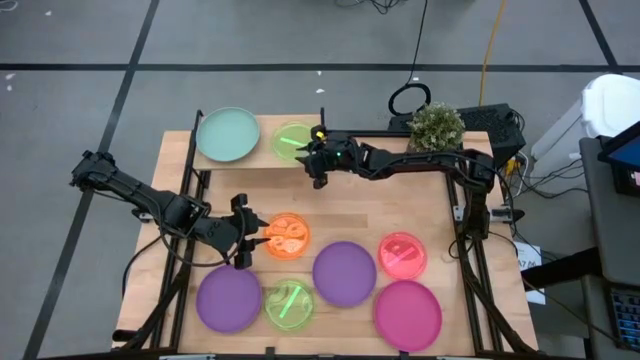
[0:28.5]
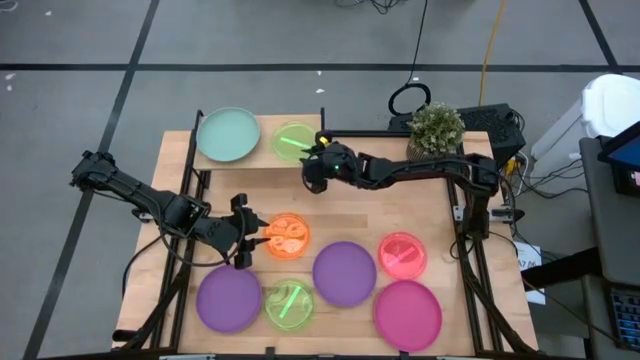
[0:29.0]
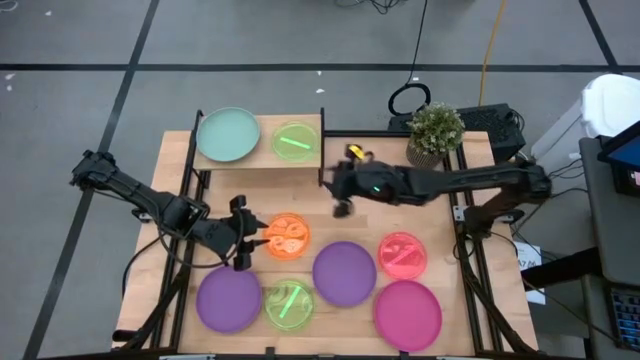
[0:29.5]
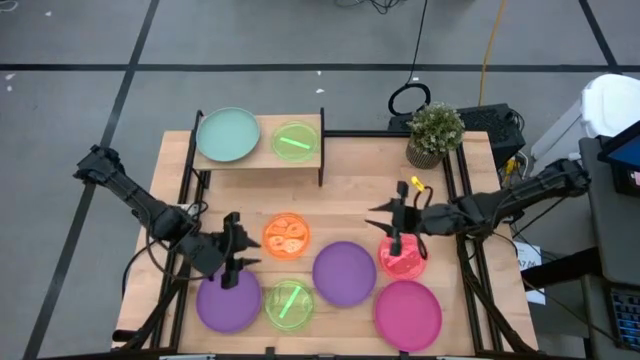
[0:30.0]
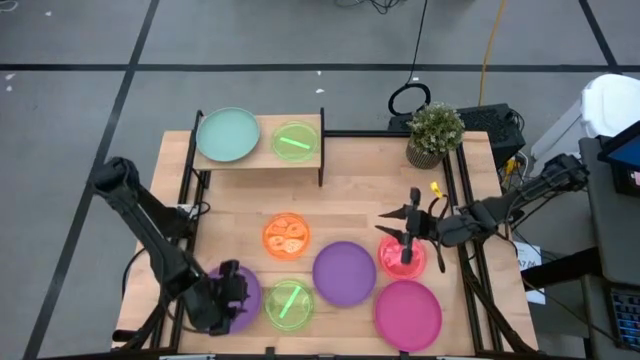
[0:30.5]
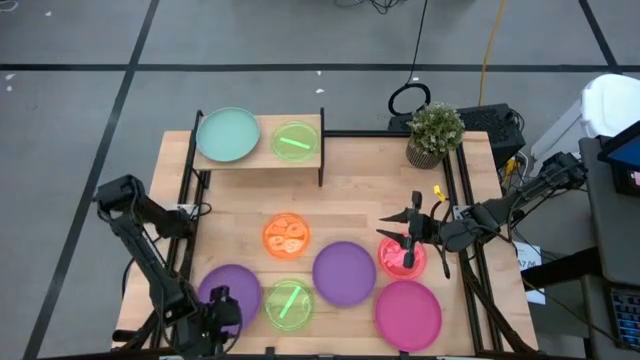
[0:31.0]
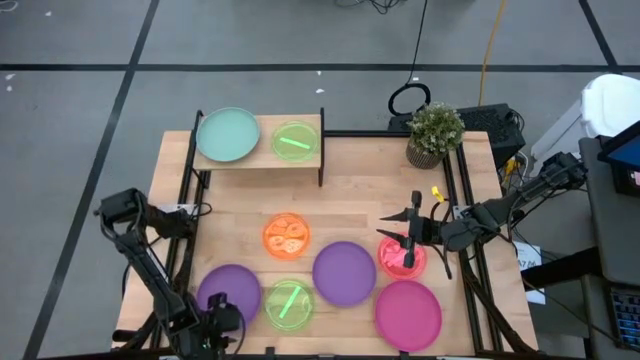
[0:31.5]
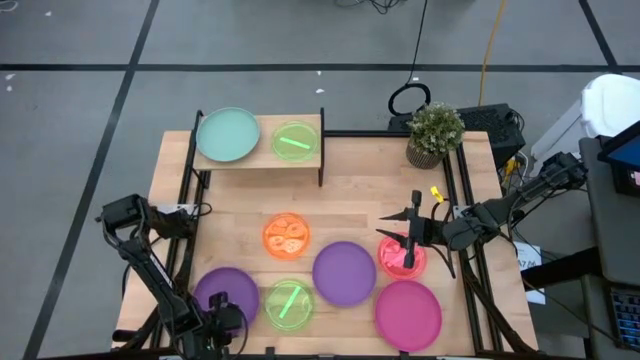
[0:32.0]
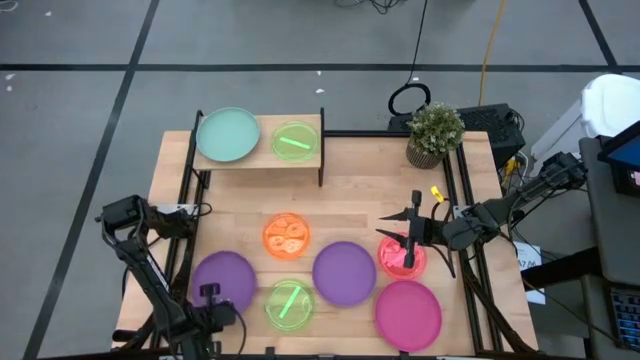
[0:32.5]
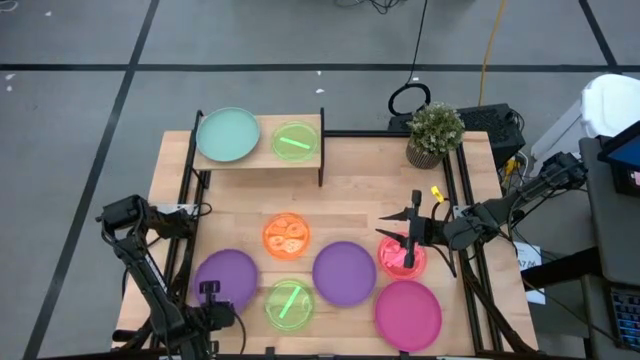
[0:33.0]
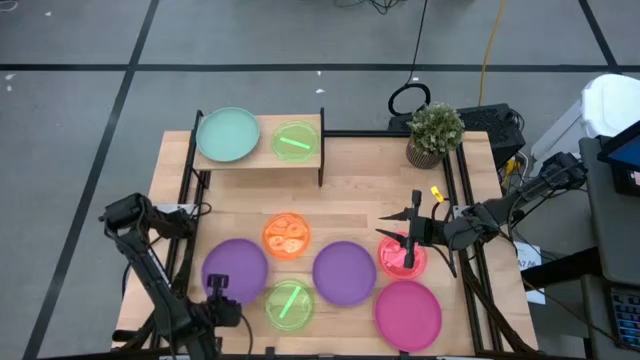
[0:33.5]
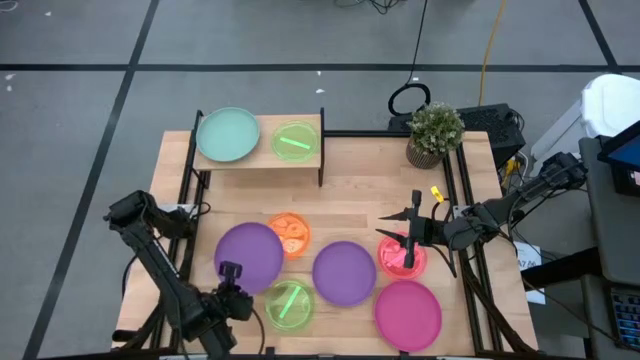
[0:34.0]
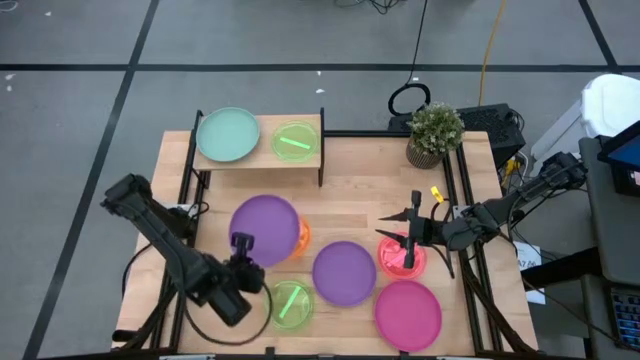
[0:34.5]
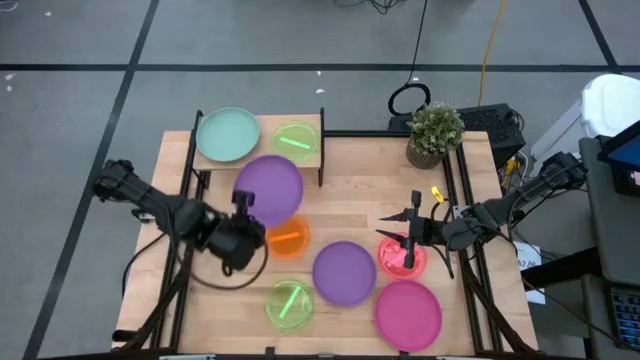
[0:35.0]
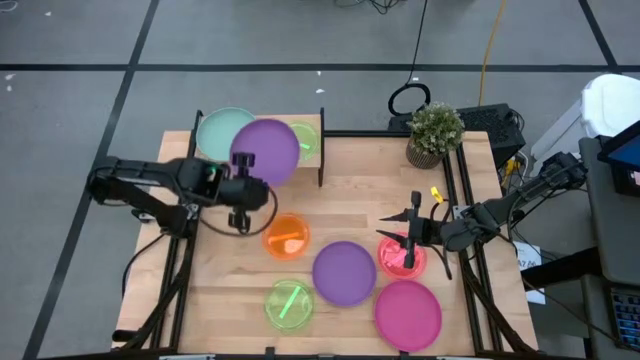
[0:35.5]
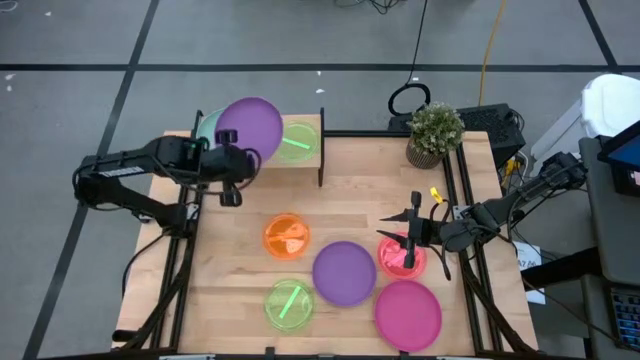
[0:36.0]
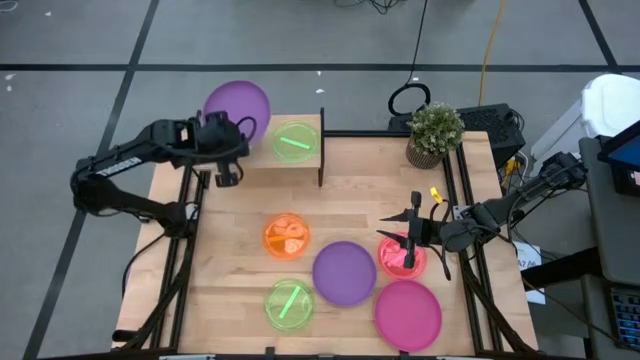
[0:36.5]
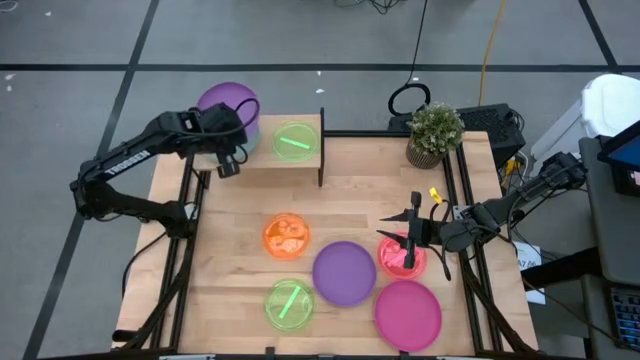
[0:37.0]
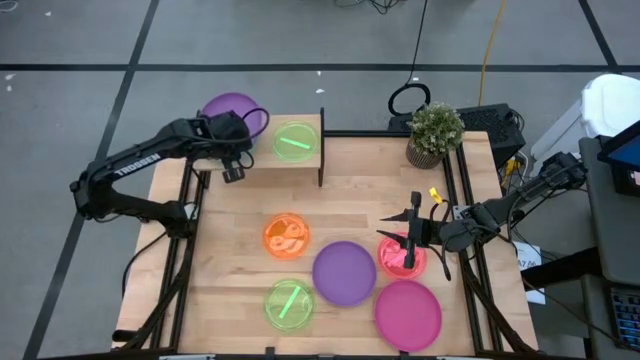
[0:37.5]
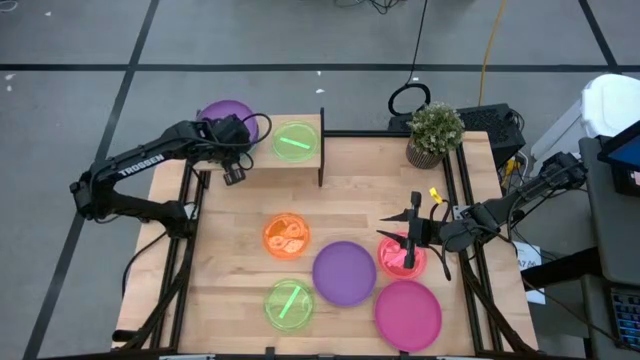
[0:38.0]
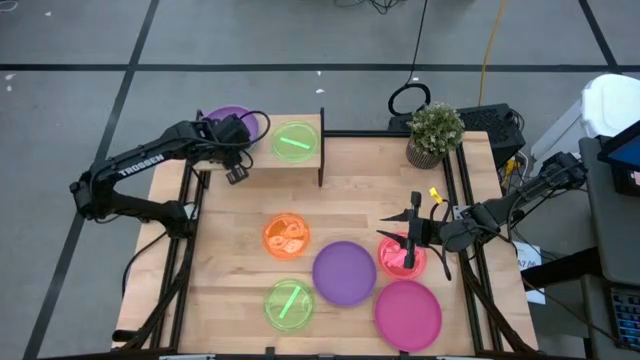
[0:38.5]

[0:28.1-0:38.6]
Task: Place and stack plates onto a shelf
Stack the left purple plate on on top of the light green plate on the shelf

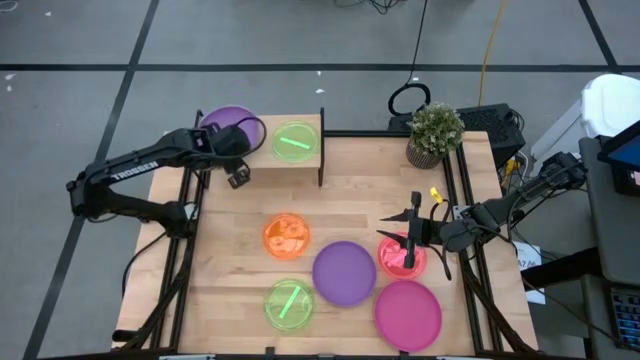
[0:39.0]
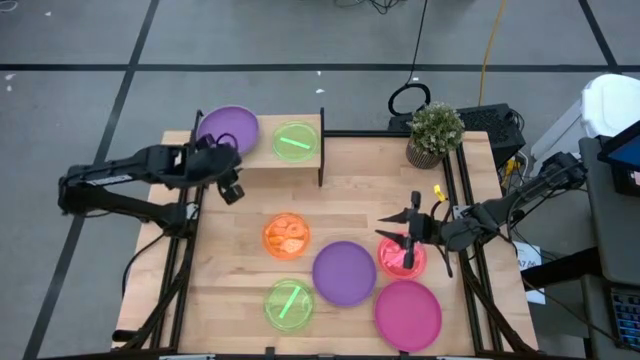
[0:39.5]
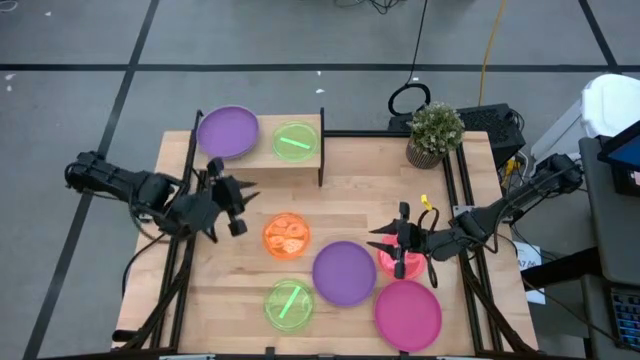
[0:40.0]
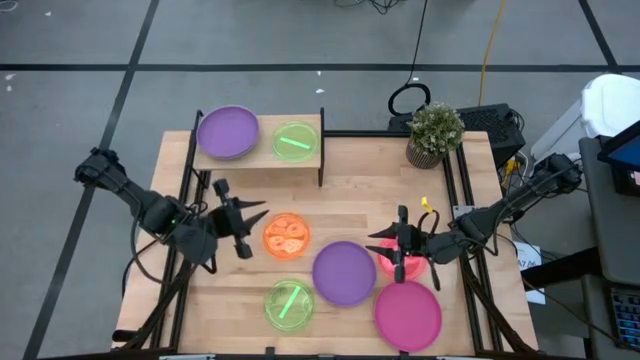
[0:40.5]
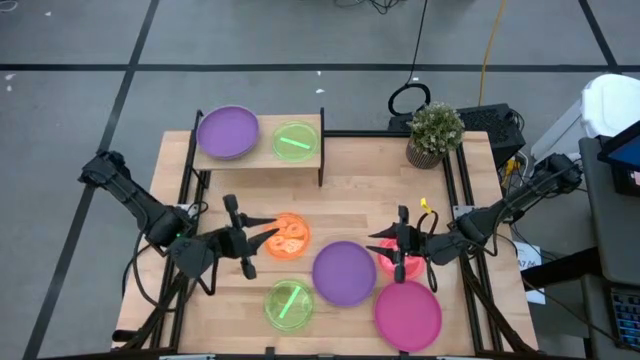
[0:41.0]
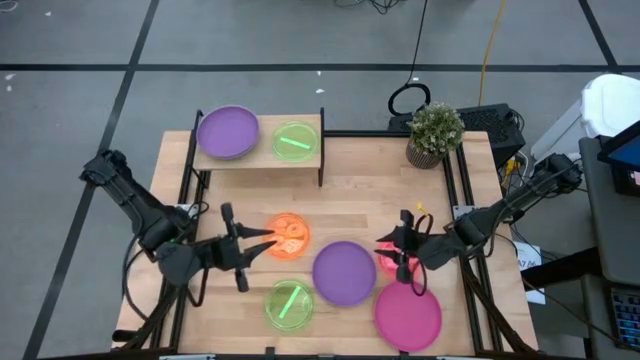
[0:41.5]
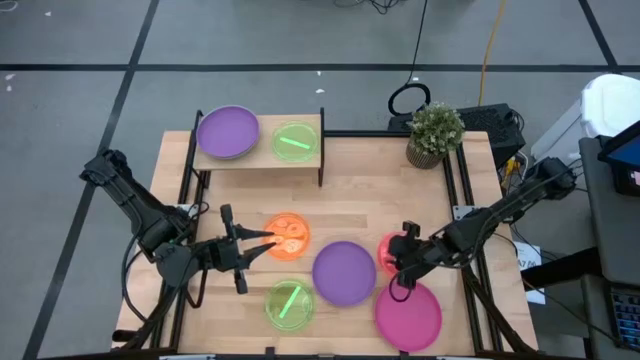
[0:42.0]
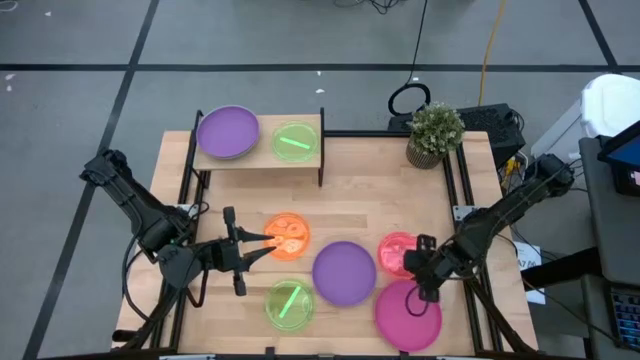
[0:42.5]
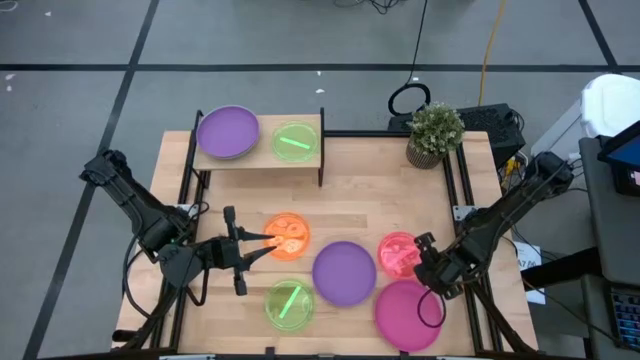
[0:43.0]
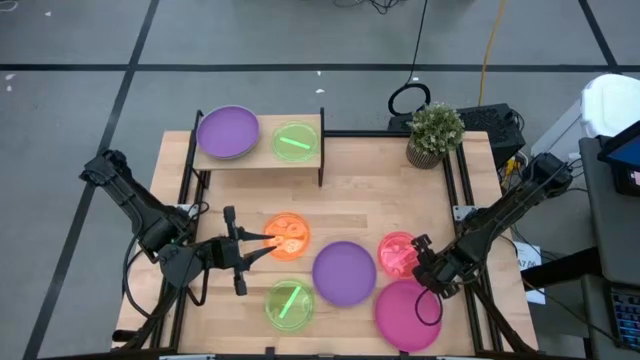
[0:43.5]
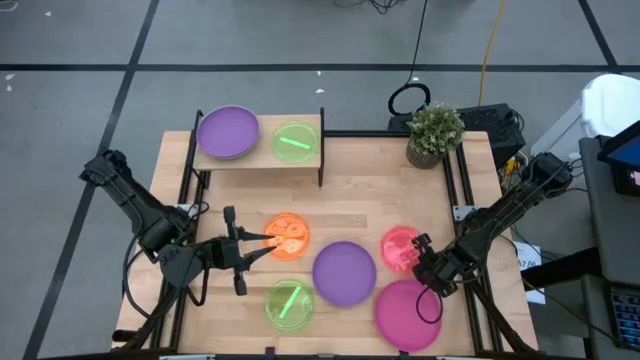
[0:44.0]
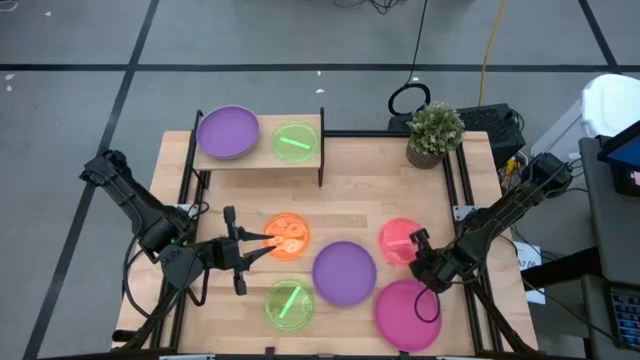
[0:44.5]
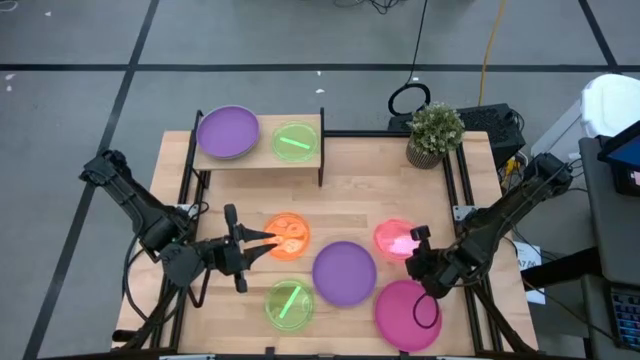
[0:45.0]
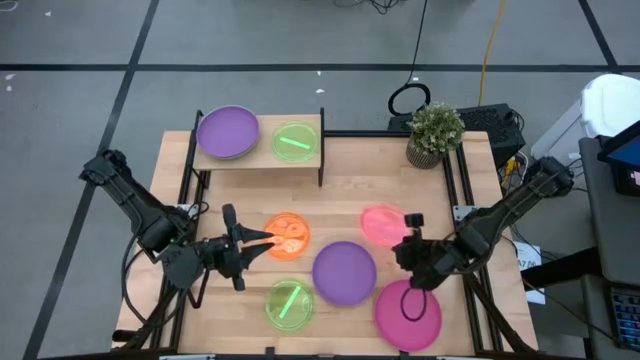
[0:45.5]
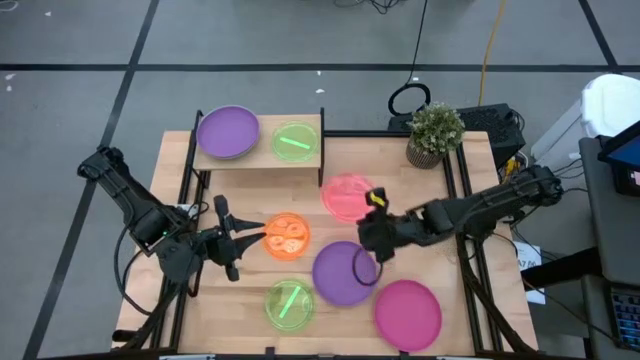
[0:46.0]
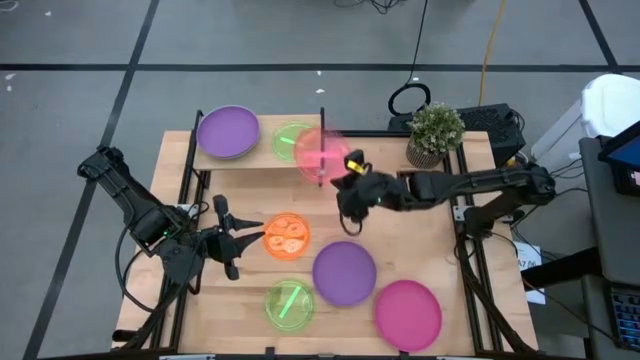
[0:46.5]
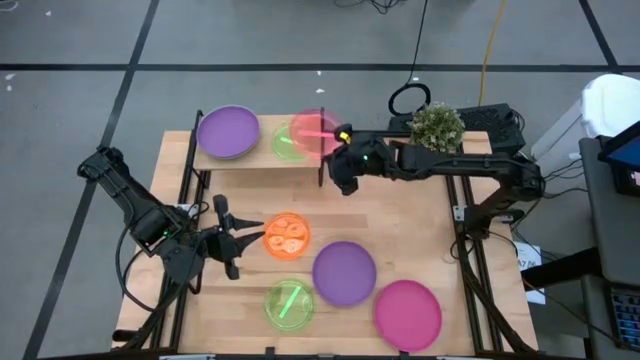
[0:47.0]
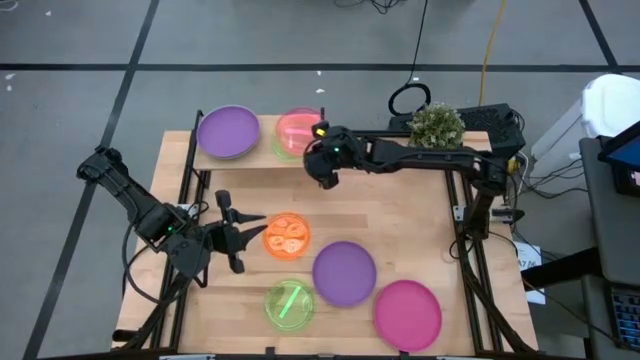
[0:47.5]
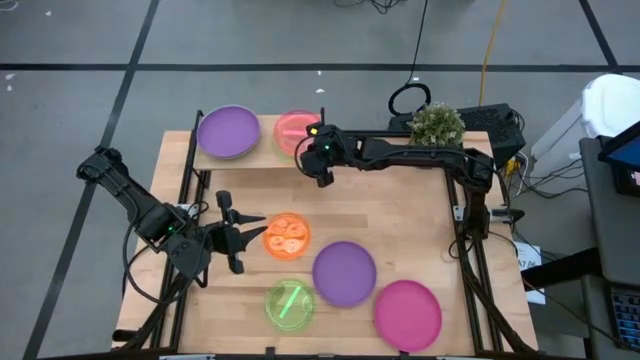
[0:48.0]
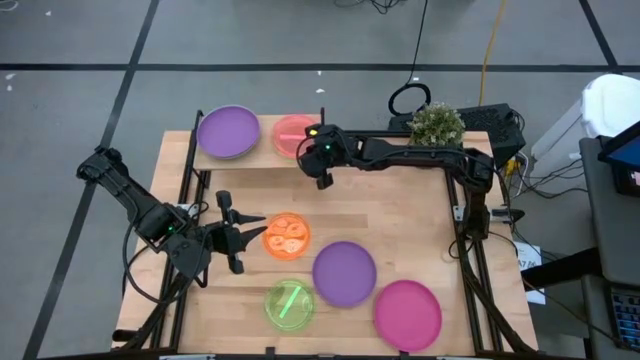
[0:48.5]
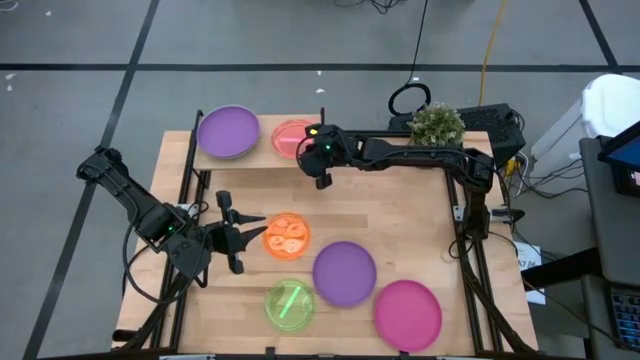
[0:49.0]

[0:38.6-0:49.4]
Stack the transparent pink plate on top of the transparent green plate on the shelf
